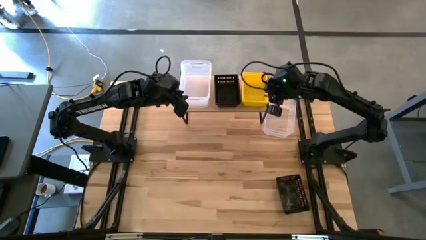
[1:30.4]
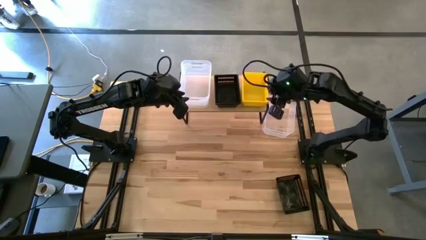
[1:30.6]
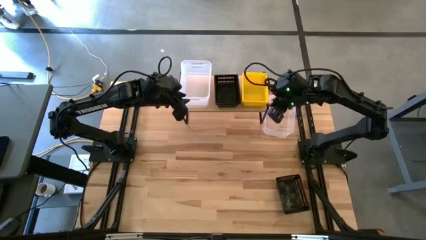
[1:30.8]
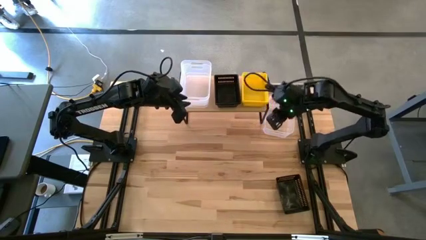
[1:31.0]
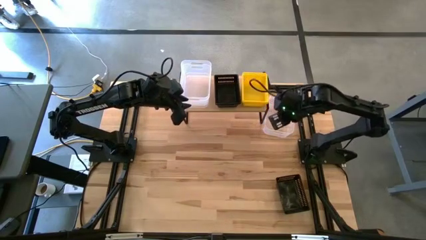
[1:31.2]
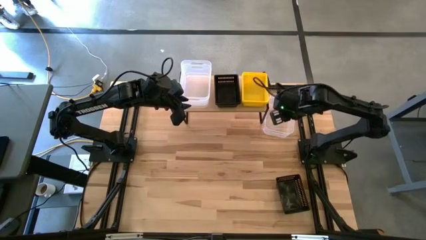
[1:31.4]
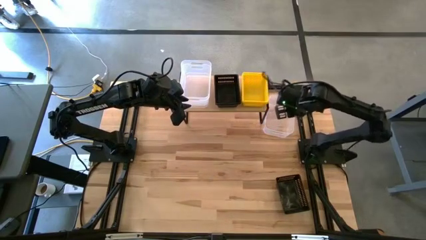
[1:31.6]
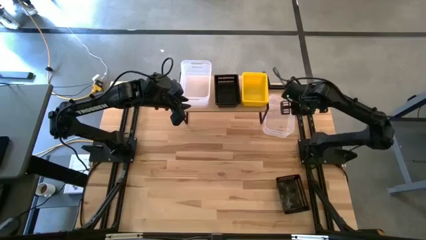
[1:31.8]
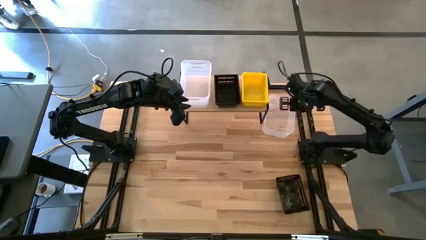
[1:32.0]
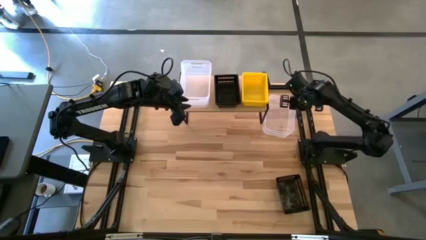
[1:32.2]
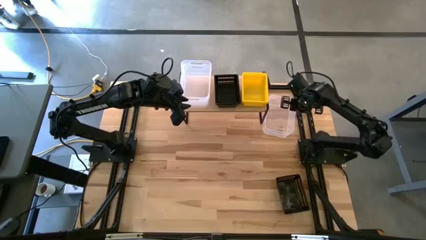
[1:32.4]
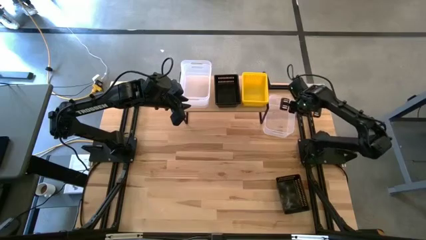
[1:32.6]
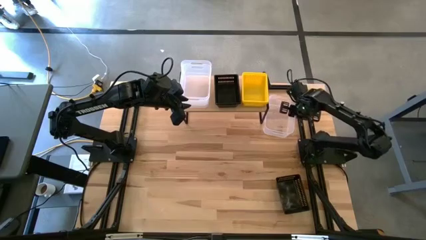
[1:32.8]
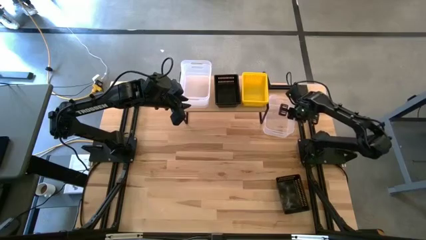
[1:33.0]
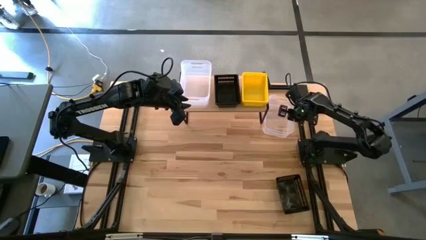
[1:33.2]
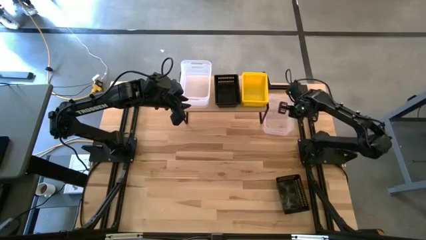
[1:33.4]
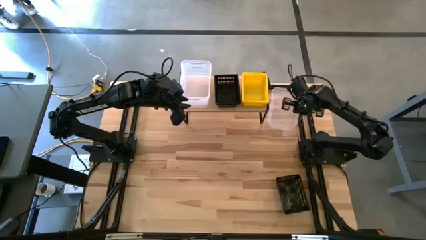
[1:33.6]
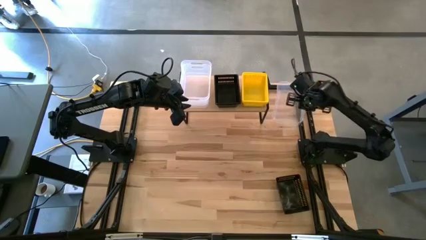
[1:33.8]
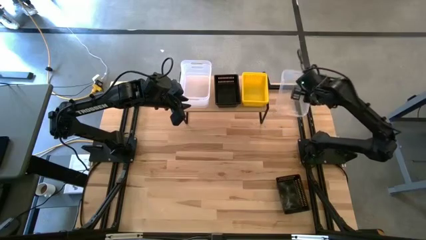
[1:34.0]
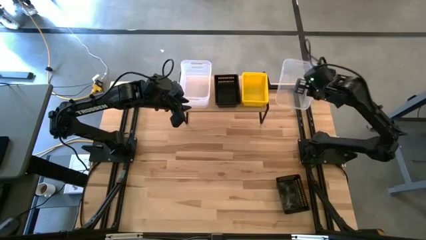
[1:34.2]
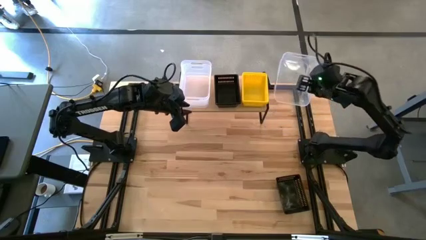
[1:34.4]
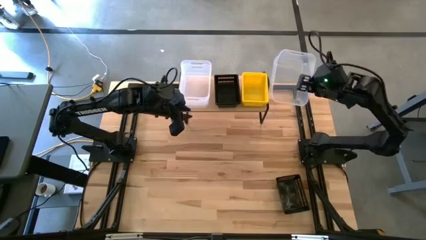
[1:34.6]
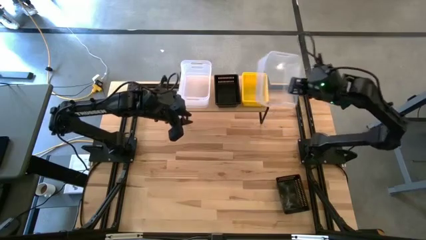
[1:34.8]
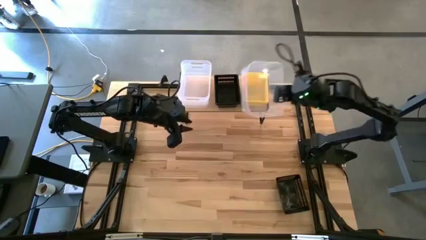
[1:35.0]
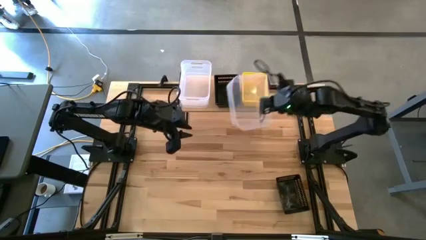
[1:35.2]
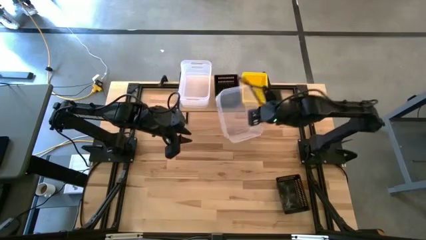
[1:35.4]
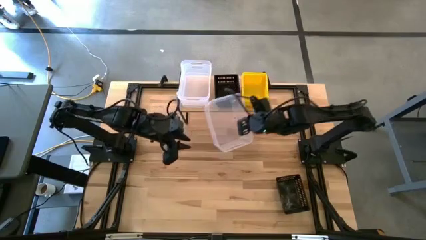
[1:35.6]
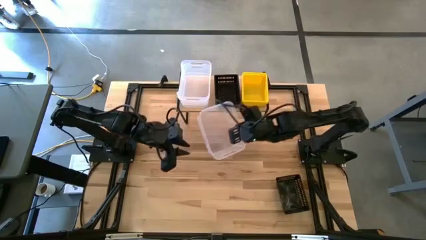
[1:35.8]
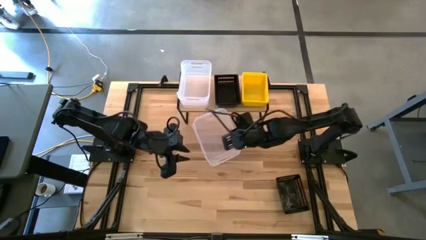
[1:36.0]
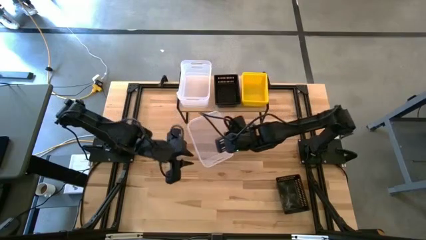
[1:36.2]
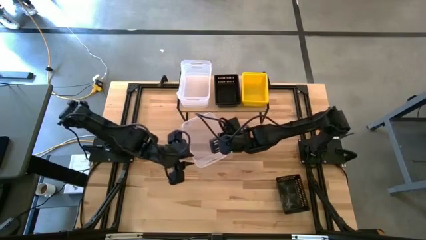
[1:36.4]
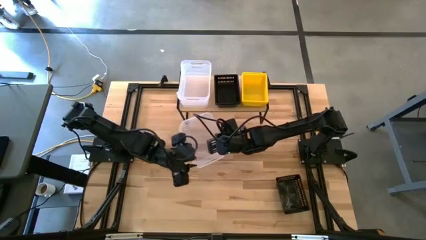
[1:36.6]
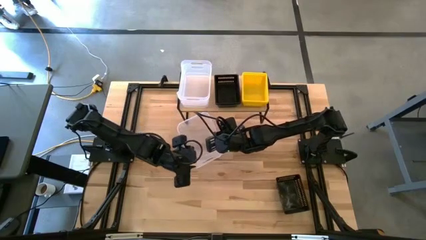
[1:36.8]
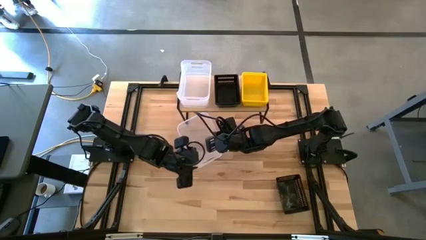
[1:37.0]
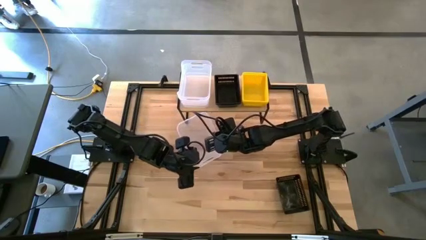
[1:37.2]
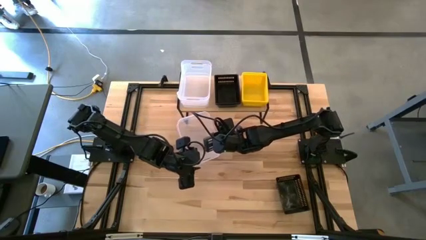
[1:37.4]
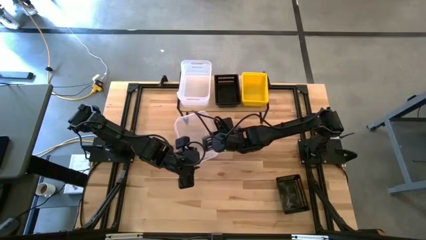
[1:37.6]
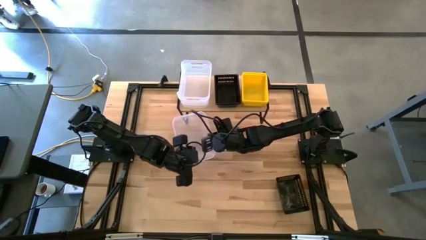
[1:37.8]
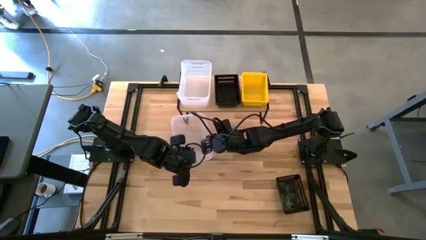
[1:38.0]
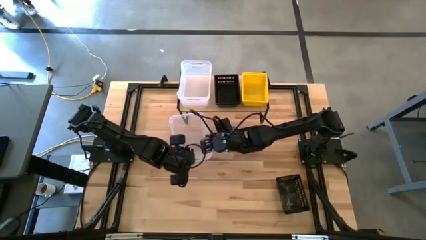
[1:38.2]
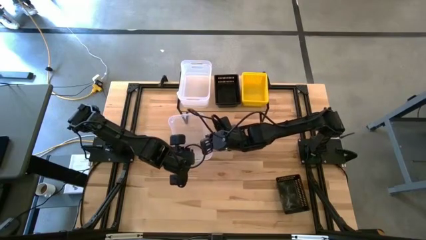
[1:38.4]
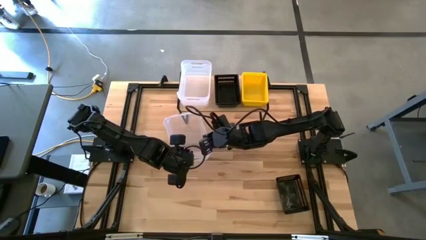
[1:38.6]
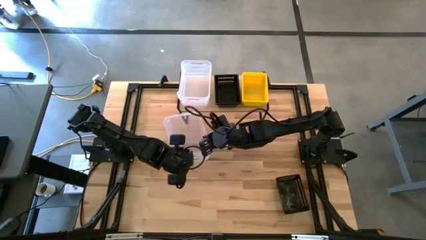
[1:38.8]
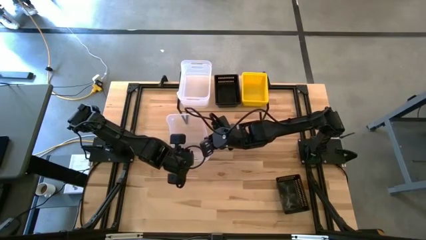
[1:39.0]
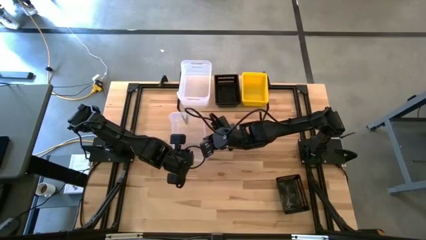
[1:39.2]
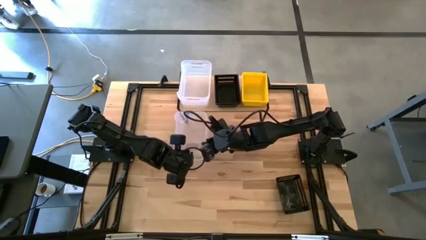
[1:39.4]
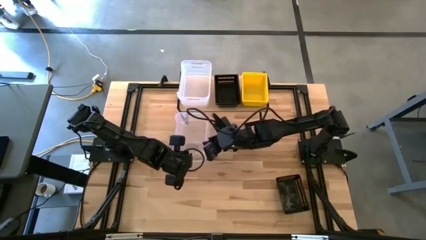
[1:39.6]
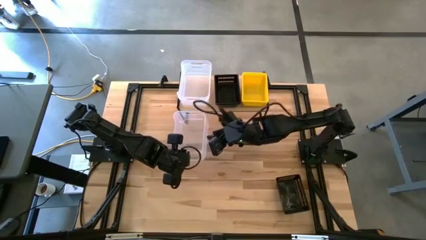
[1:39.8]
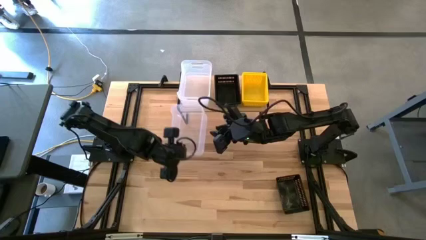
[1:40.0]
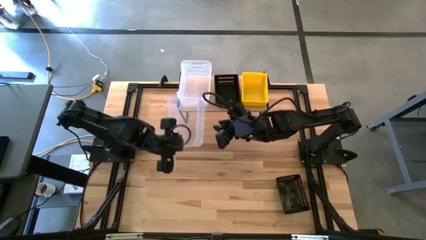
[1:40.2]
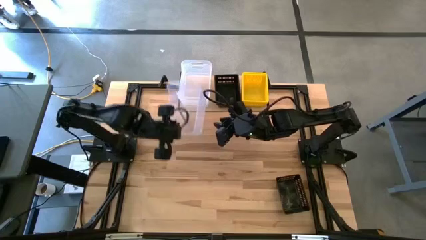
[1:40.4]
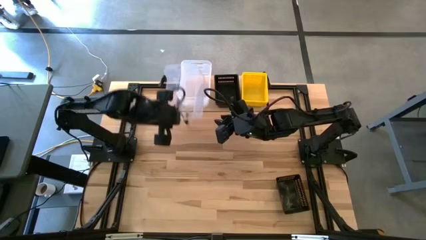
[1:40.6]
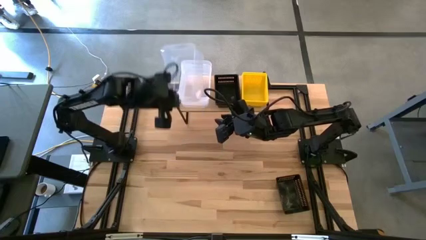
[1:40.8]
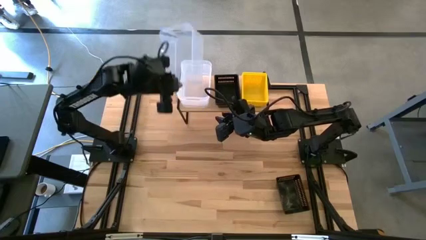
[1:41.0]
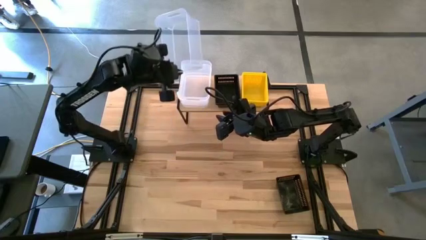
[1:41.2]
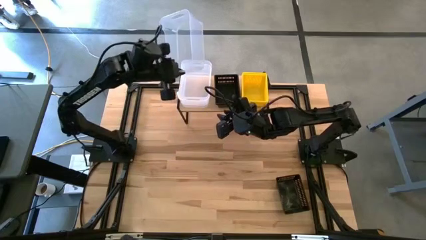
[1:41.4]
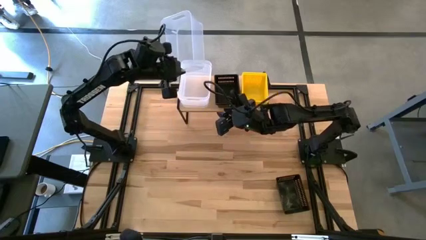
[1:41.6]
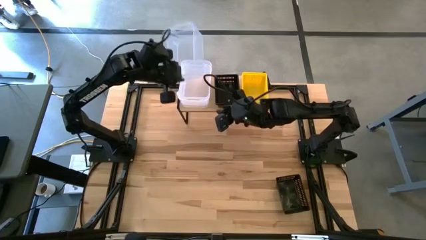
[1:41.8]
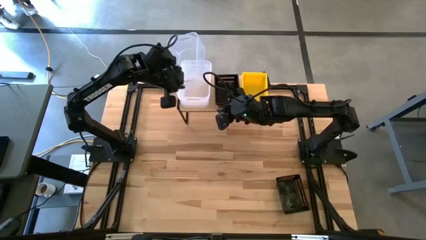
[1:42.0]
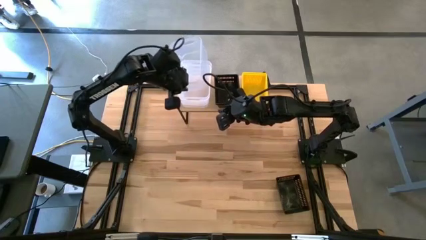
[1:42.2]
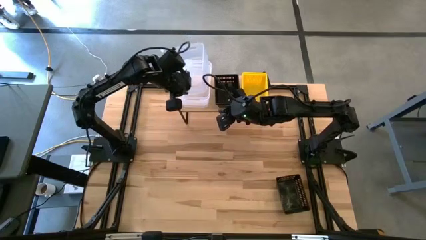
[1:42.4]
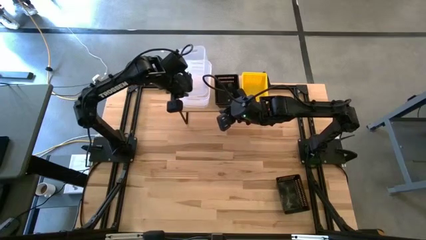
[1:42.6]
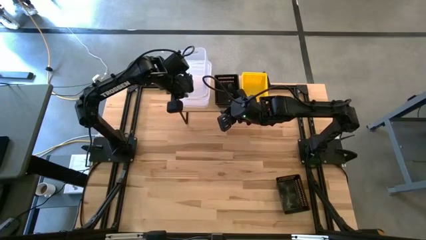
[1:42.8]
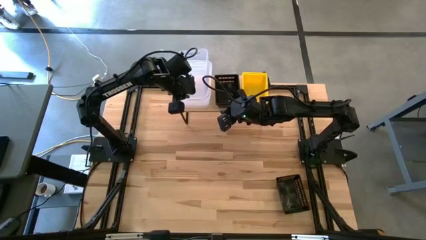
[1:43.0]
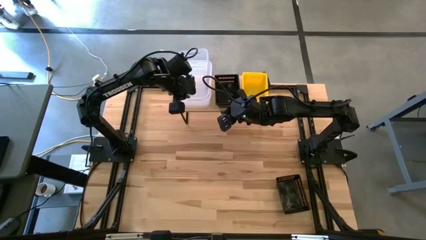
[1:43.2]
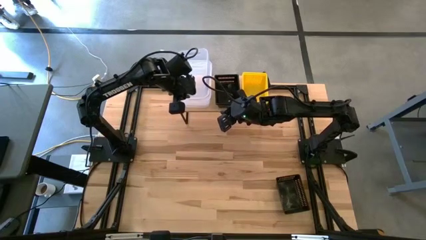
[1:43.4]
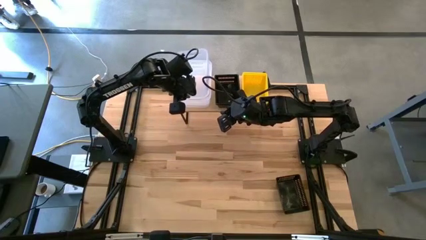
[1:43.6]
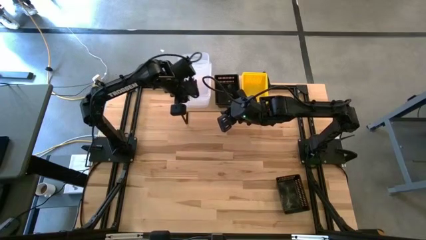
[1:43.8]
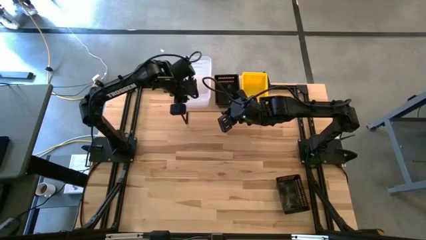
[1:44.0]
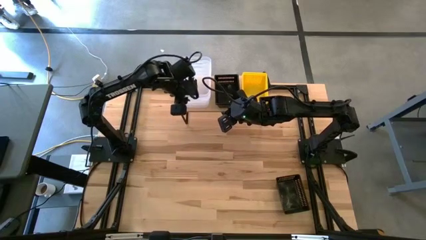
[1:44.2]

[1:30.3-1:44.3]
Task: Stack baskets on shelf by color
Stack the transparent bin on top of the transparent bin

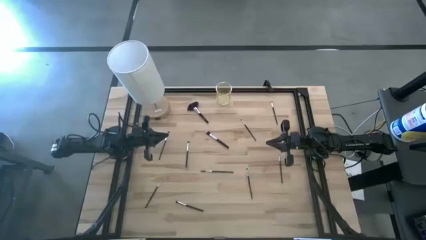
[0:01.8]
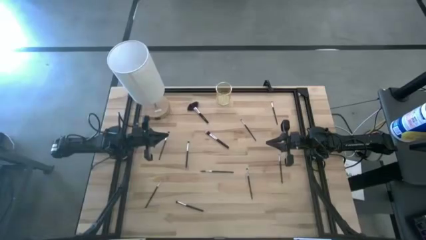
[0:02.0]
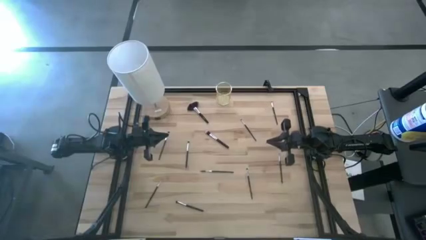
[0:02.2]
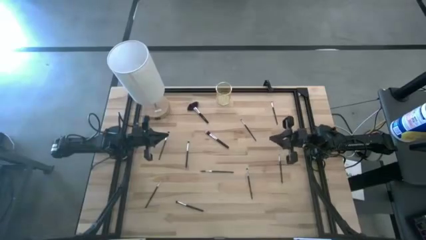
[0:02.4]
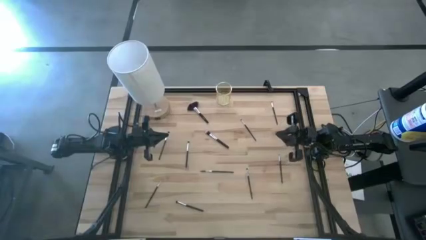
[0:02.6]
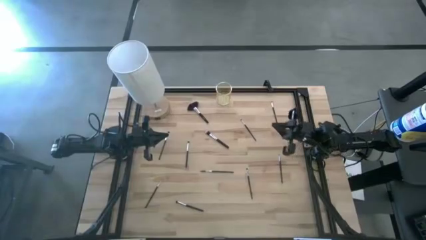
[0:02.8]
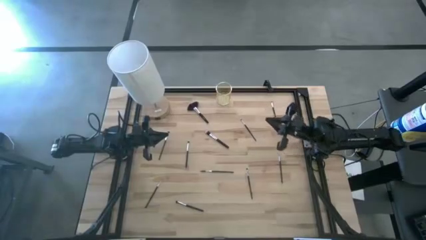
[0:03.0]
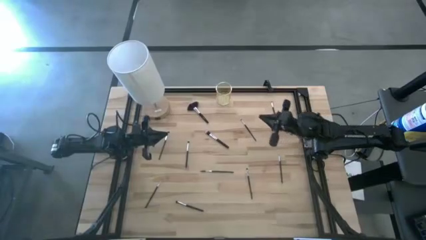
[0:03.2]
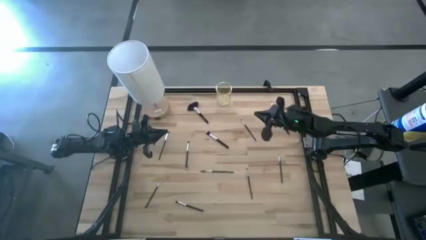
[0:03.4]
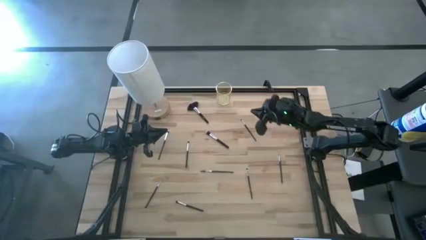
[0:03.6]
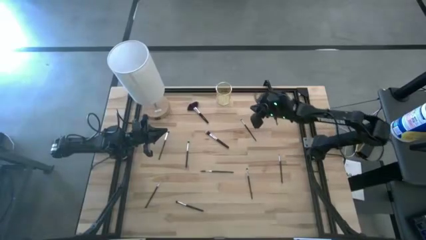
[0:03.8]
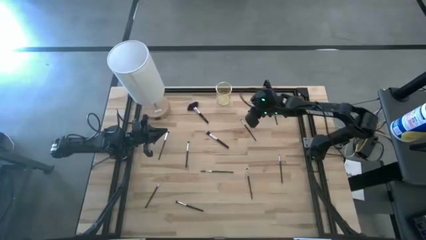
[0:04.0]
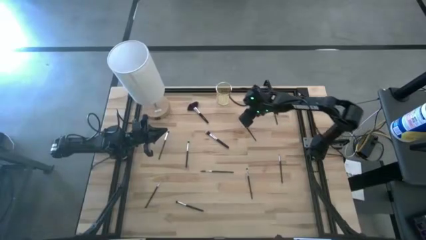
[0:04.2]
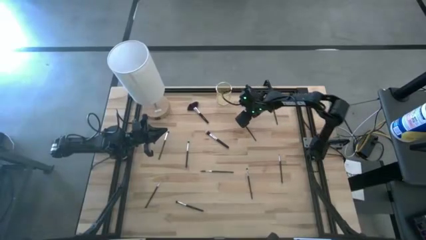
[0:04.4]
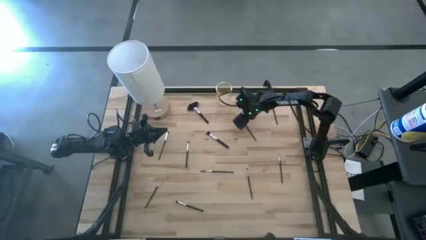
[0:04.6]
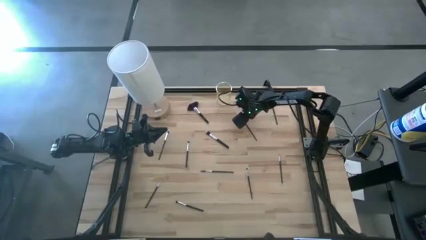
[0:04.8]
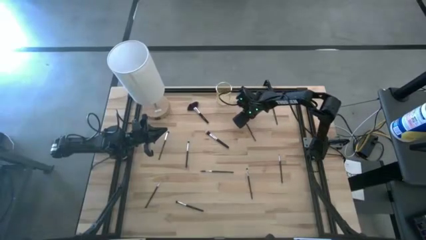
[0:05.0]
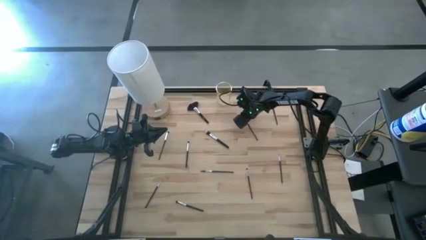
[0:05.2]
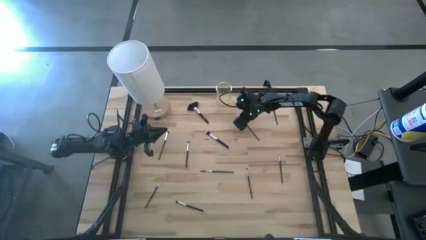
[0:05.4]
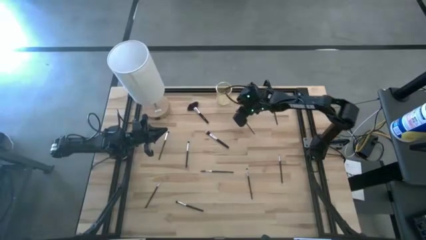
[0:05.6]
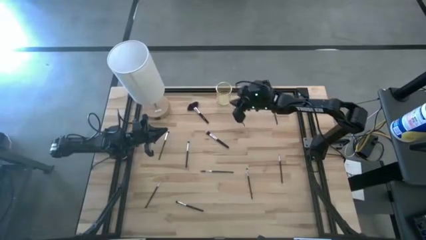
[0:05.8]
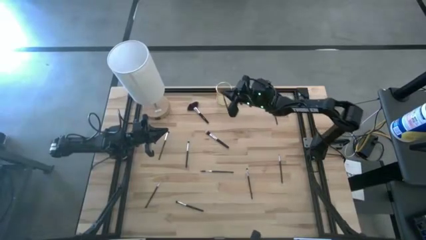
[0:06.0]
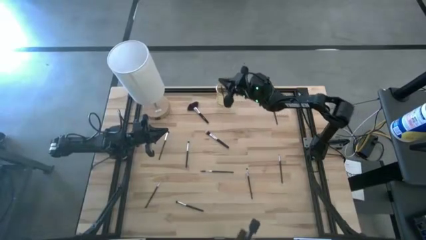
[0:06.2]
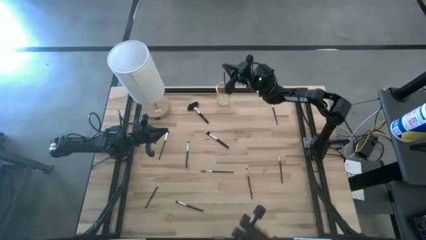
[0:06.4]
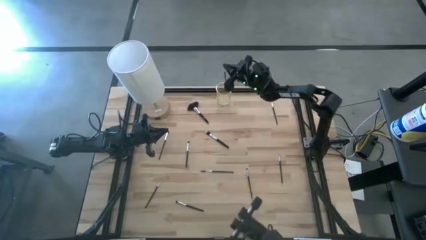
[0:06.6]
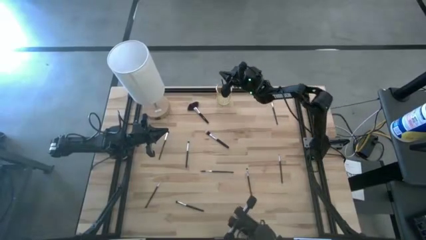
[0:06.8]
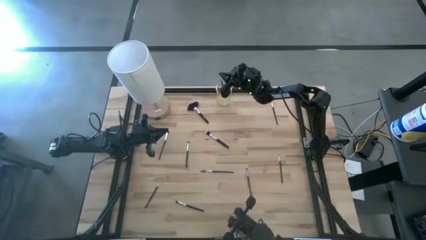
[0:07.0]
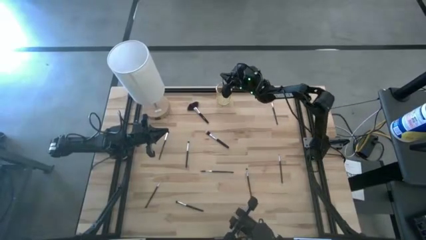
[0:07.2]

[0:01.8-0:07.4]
Task: Put items in baskets/containers
Put the eyeshadow brush into the gold container
